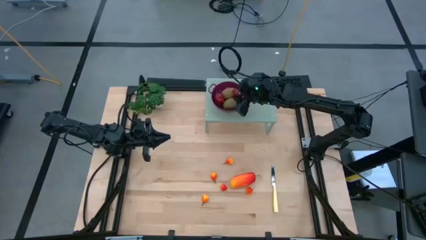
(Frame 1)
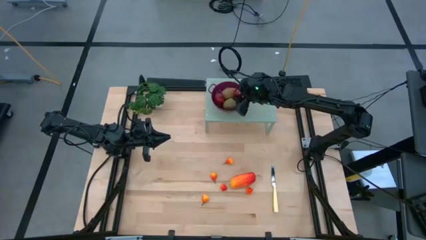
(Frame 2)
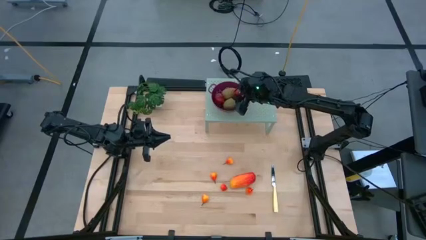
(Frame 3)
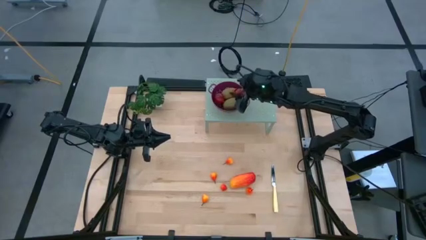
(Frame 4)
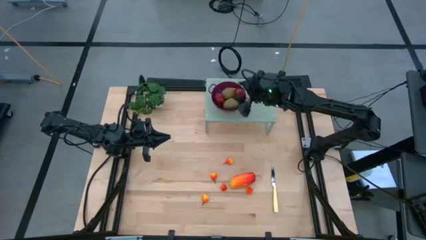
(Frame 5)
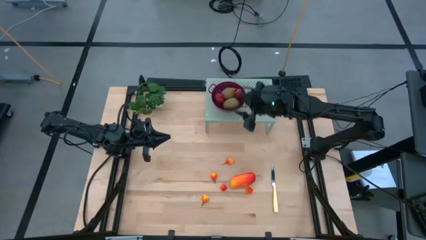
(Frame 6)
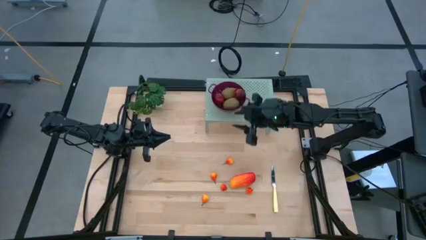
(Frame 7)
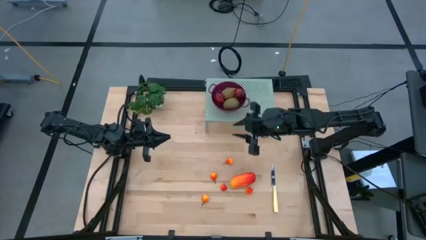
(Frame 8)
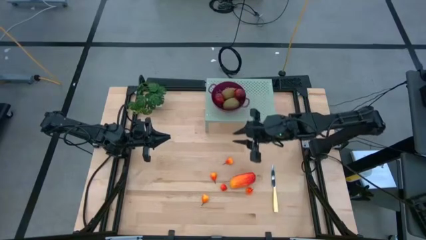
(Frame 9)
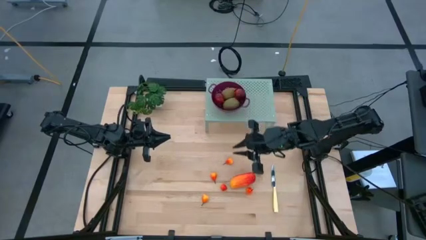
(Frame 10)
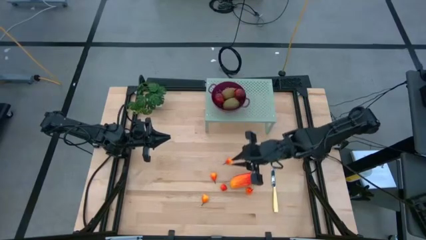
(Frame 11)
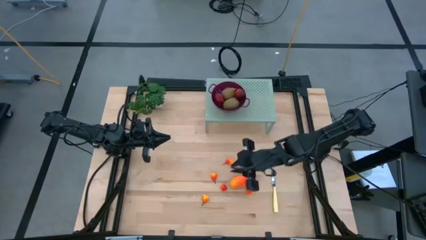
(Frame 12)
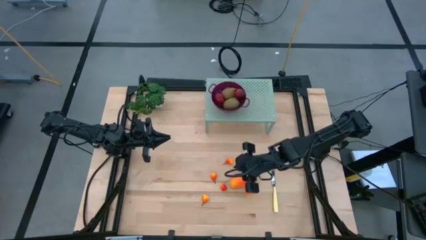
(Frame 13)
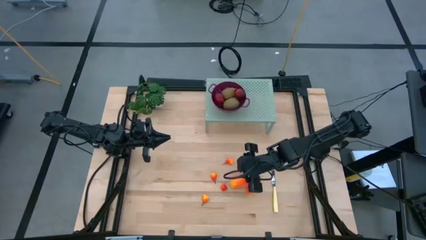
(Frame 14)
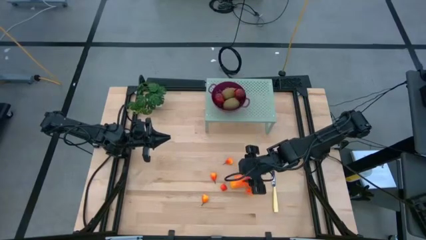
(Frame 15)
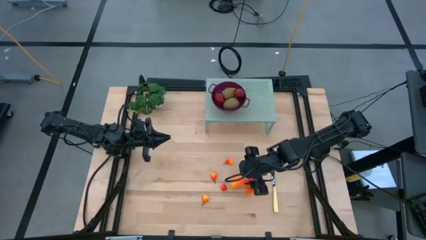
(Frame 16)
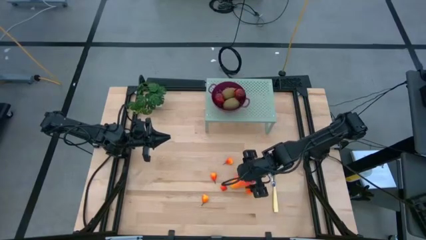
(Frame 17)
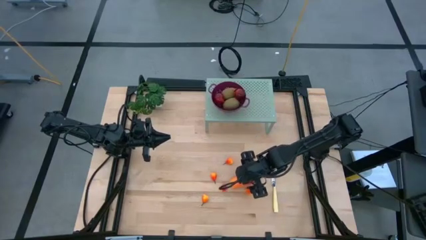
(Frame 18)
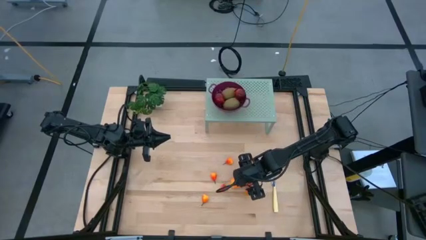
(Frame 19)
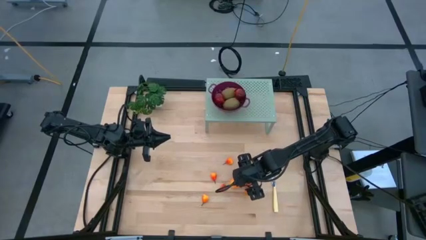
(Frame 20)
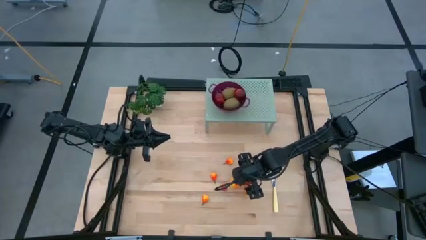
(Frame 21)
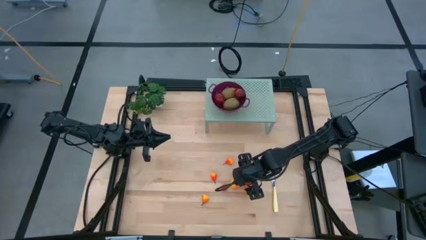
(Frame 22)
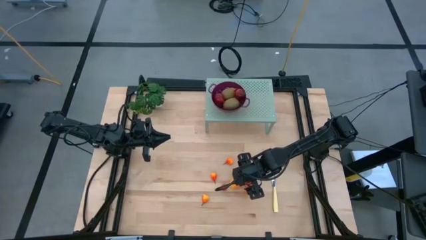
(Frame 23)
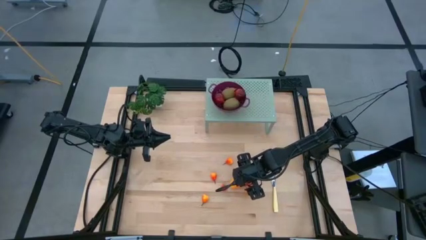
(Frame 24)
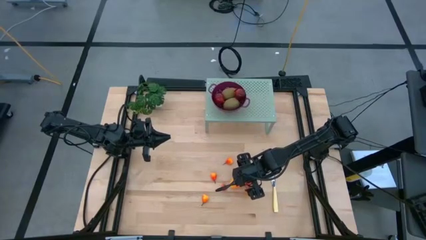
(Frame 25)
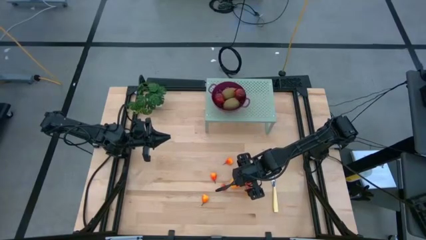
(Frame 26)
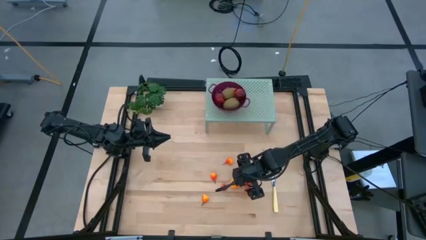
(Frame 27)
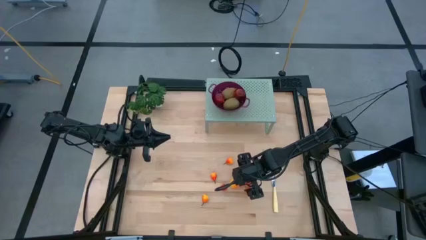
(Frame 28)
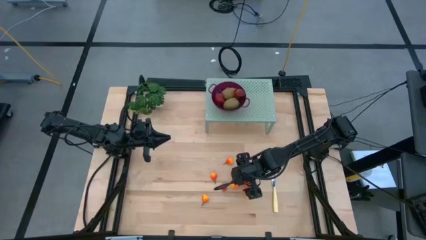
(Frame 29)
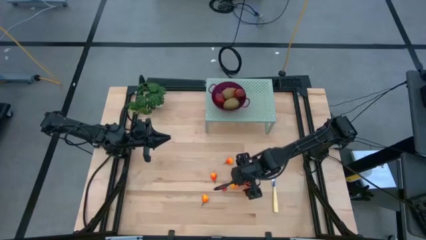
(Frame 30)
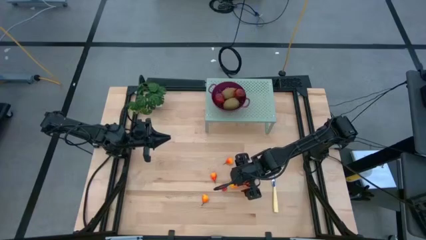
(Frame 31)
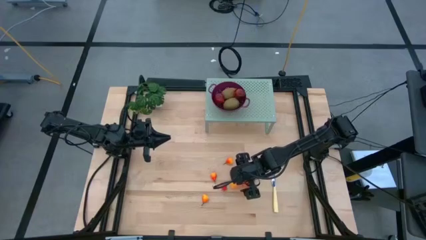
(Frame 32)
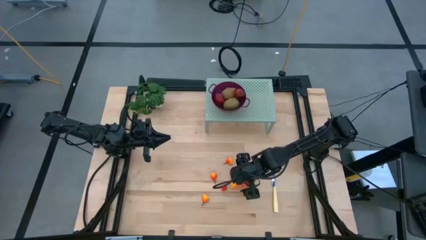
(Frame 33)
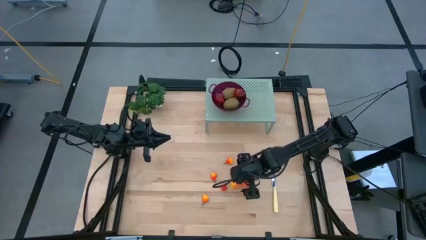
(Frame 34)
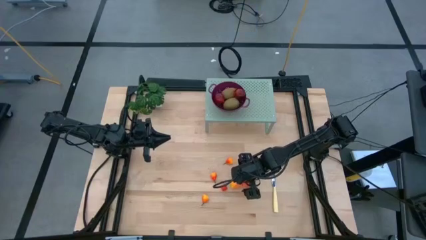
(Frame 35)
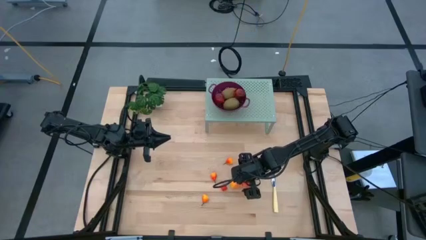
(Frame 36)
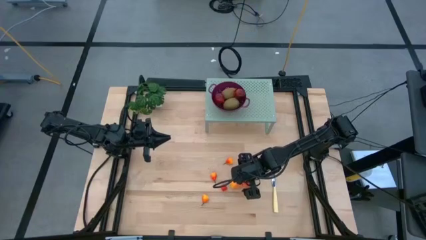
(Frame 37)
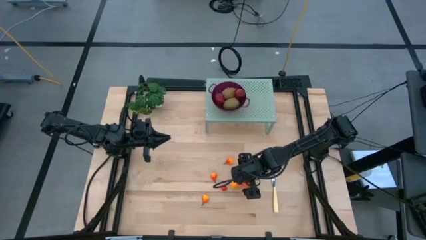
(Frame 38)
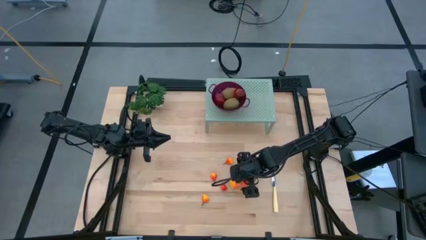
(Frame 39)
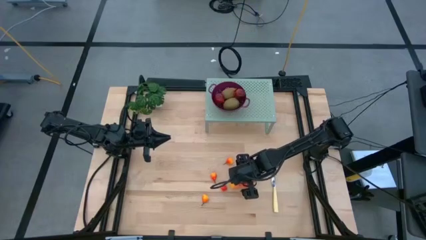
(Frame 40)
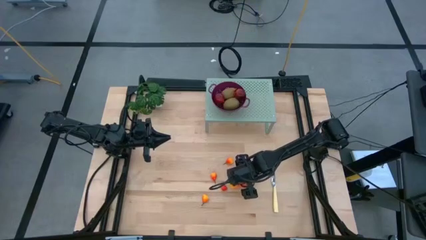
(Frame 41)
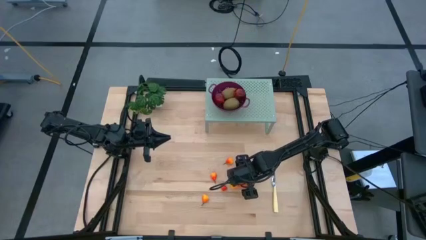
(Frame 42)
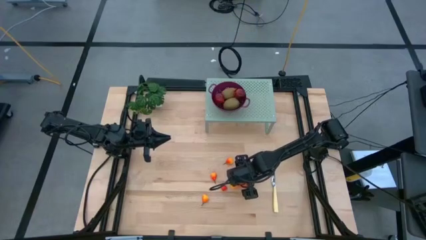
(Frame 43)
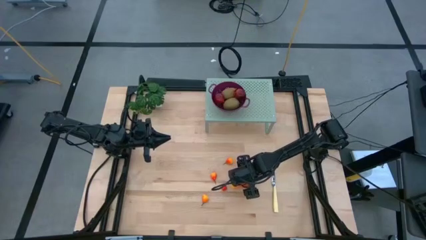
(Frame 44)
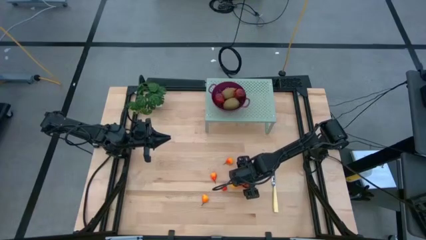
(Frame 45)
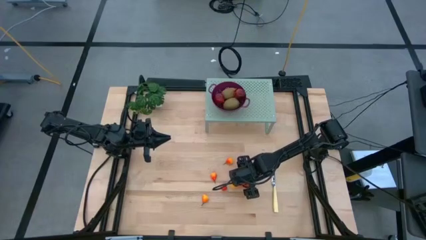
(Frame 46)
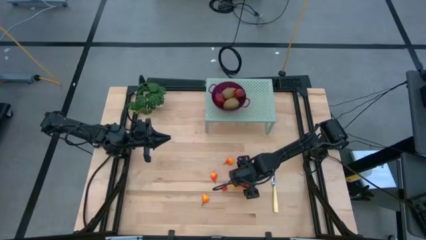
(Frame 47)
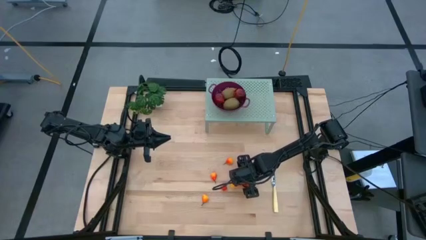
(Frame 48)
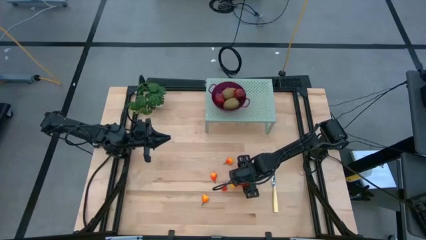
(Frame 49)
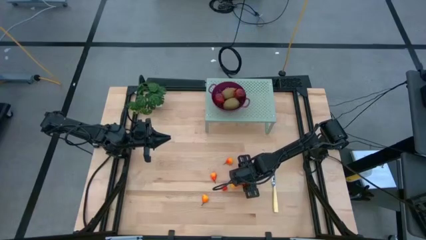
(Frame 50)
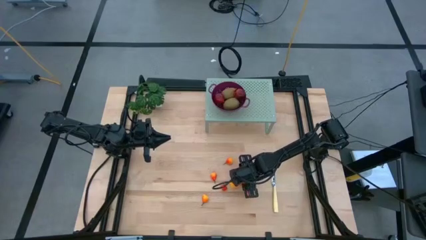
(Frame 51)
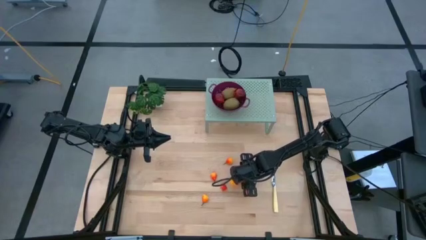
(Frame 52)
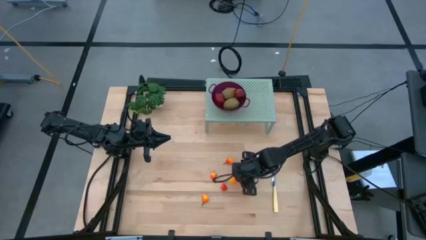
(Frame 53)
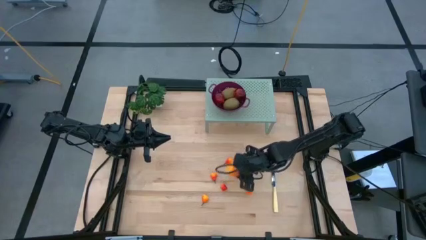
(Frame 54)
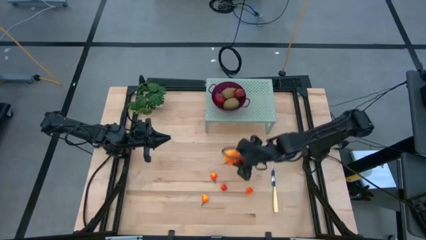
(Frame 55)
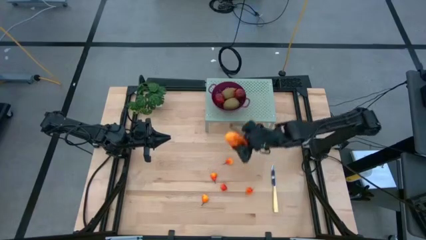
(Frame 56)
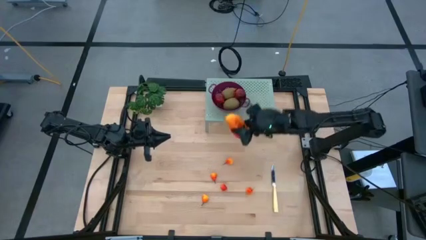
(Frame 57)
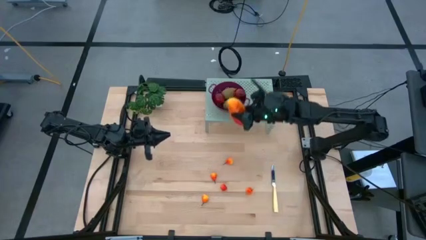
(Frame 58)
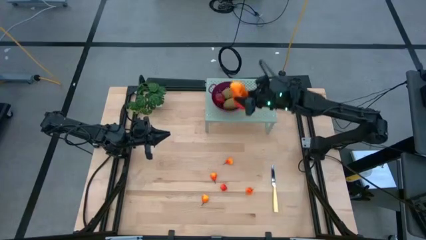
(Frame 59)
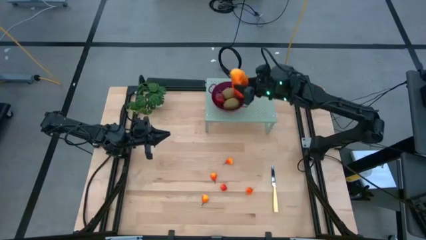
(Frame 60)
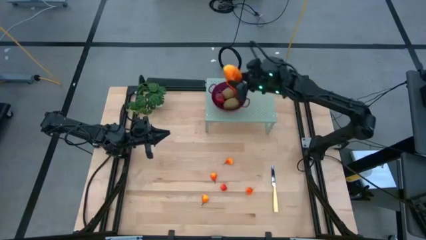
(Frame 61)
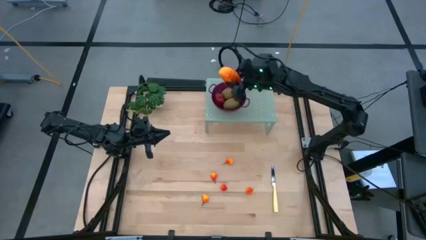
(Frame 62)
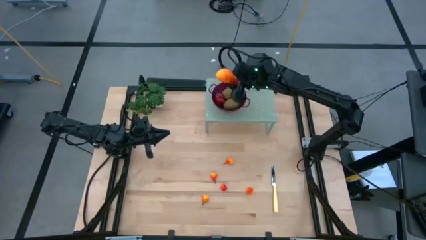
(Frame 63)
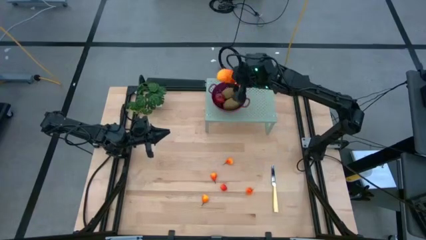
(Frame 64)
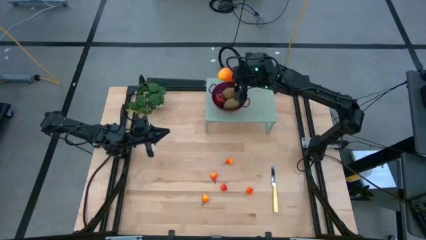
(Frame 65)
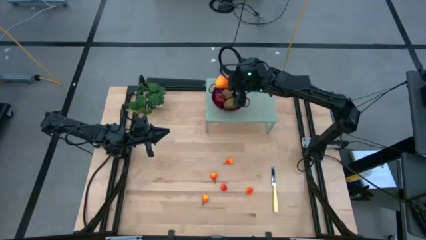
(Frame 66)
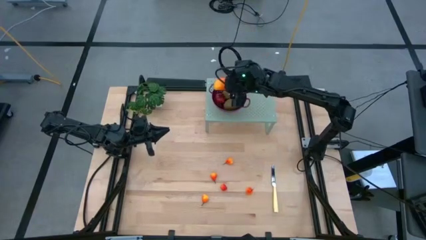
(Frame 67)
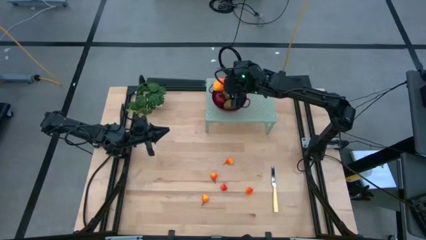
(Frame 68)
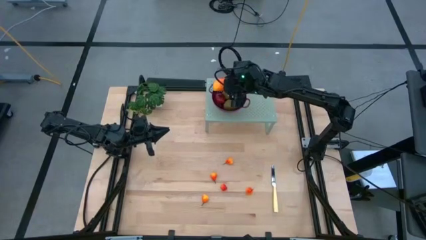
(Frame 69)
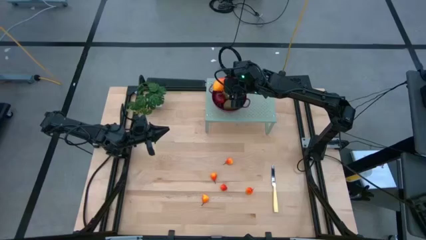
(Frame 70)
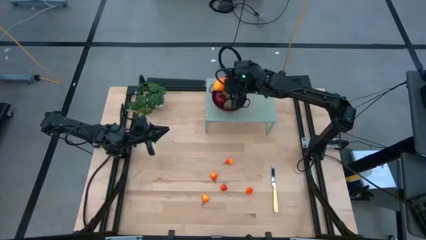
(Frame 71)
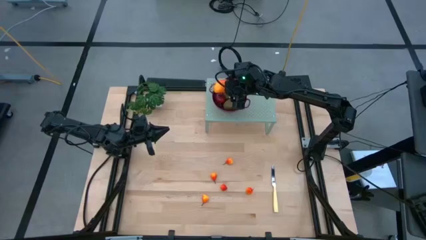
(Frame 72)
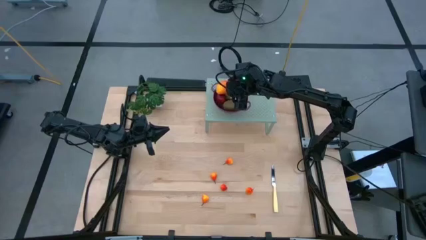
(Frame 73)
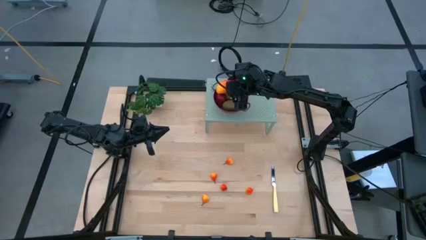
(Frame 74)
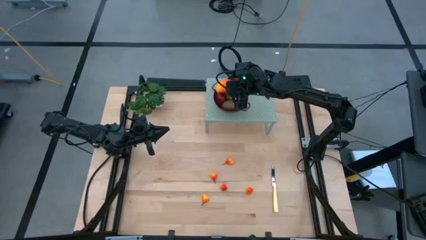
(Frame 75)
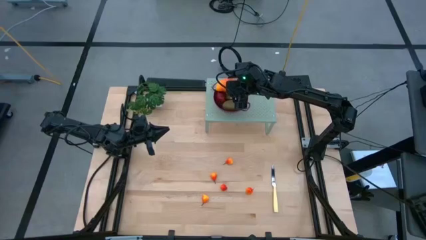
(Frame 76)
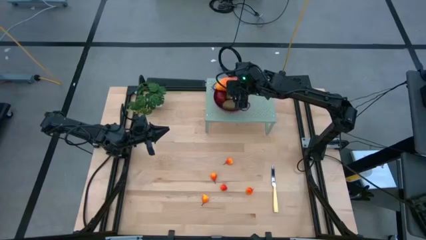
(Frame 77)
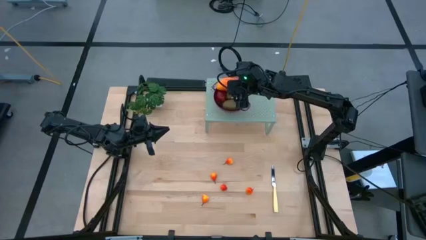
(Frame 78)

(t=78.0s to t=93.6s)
Task: Pick & Place Fruit
Put the mango into the strainer bowl on the shelf
